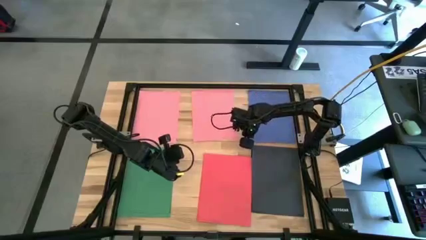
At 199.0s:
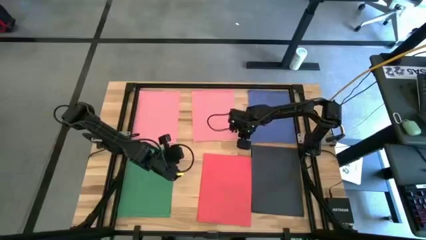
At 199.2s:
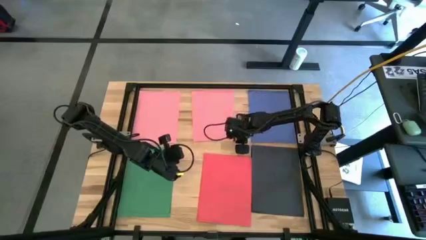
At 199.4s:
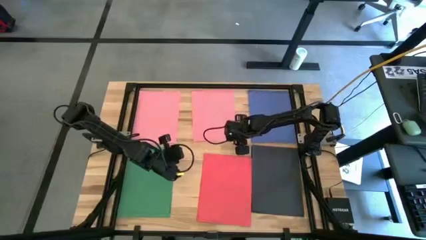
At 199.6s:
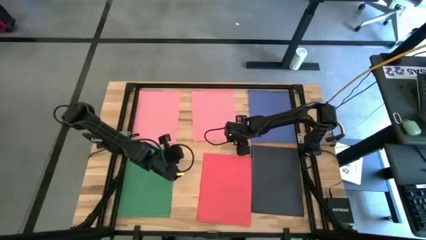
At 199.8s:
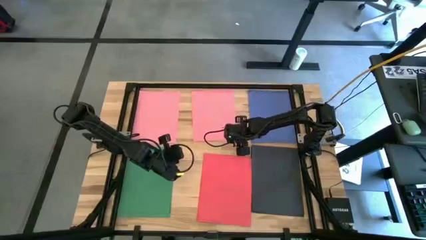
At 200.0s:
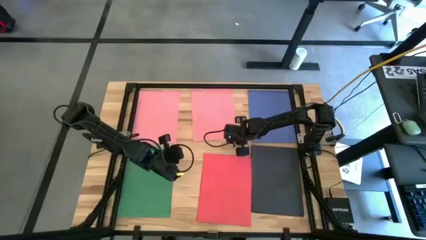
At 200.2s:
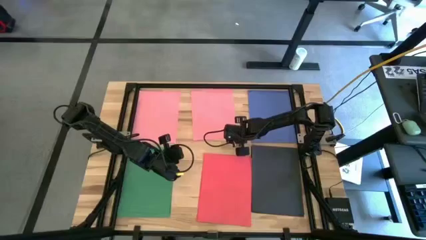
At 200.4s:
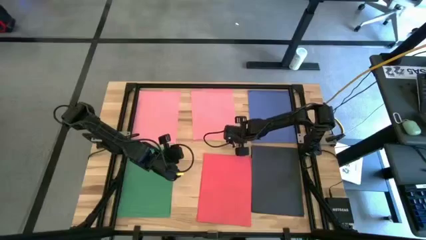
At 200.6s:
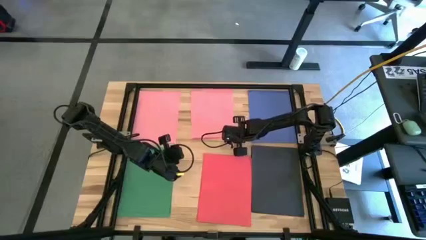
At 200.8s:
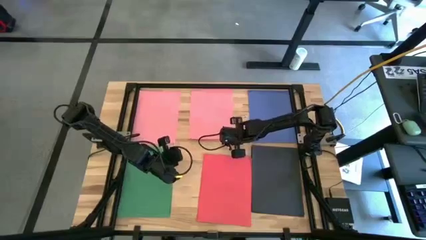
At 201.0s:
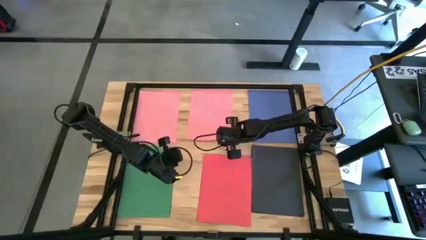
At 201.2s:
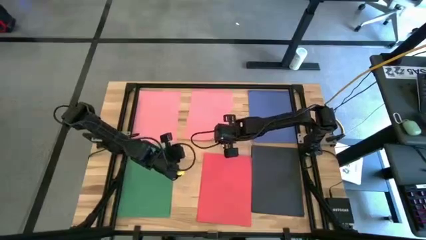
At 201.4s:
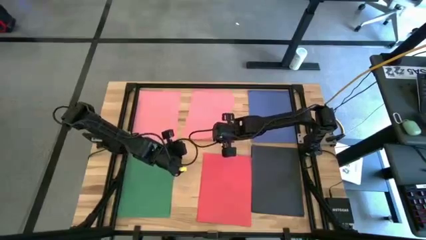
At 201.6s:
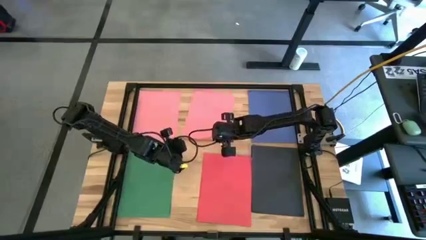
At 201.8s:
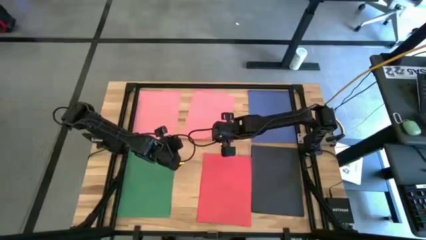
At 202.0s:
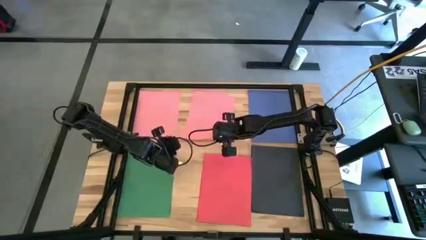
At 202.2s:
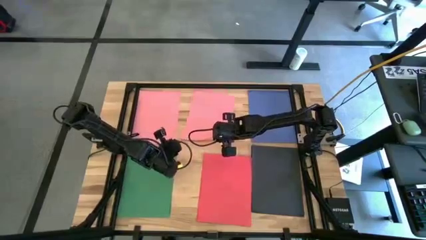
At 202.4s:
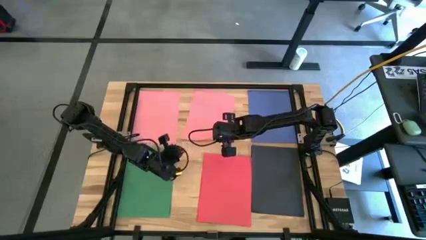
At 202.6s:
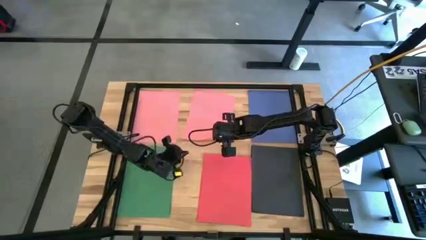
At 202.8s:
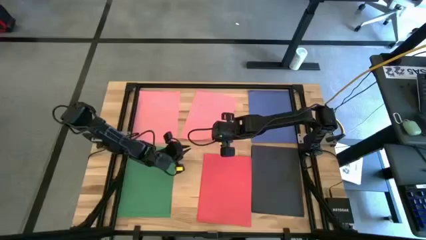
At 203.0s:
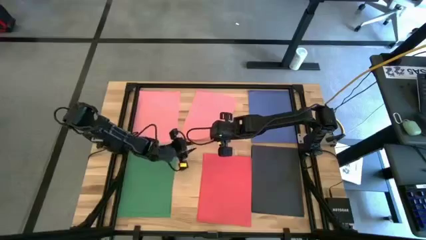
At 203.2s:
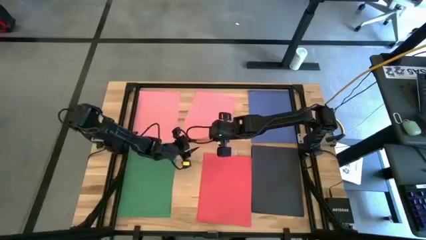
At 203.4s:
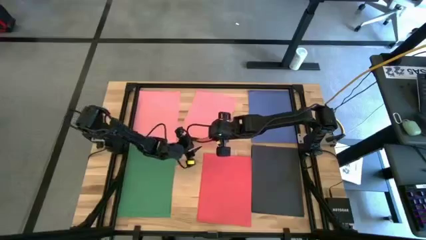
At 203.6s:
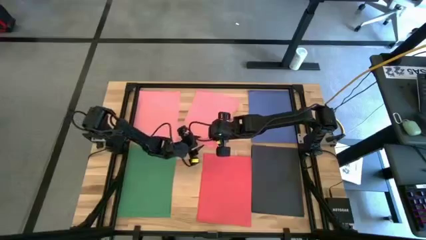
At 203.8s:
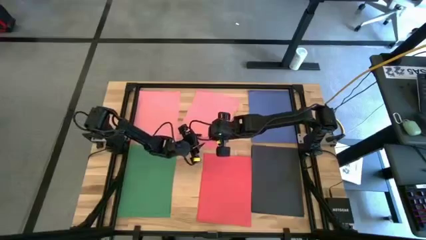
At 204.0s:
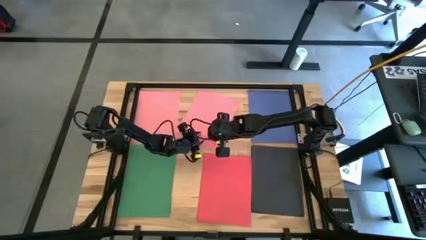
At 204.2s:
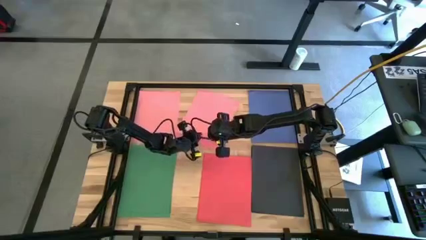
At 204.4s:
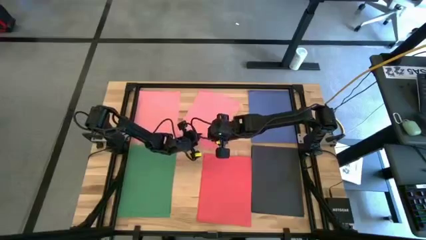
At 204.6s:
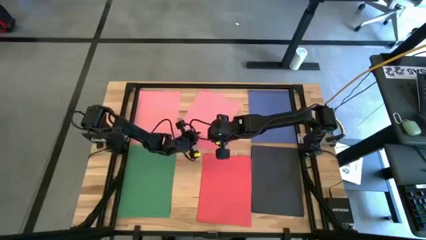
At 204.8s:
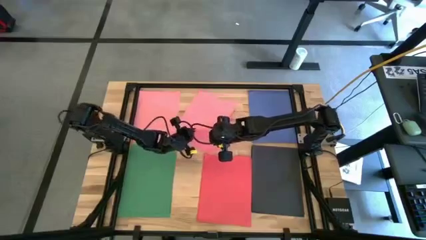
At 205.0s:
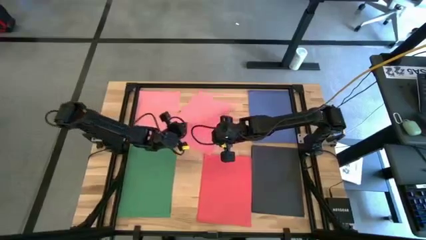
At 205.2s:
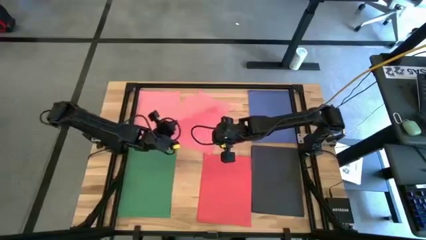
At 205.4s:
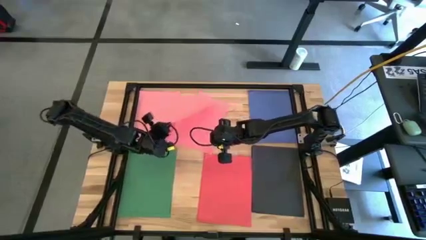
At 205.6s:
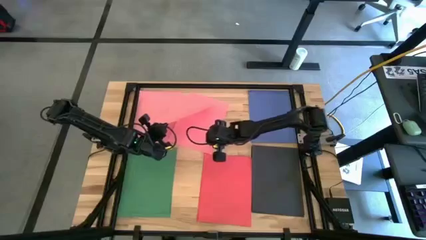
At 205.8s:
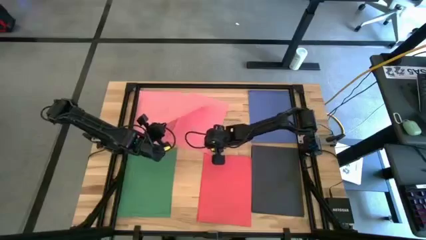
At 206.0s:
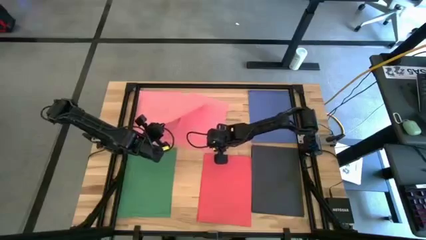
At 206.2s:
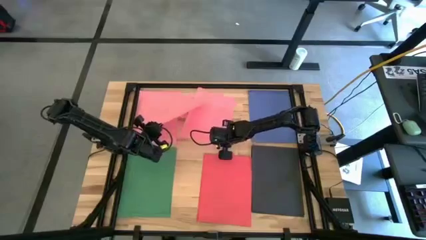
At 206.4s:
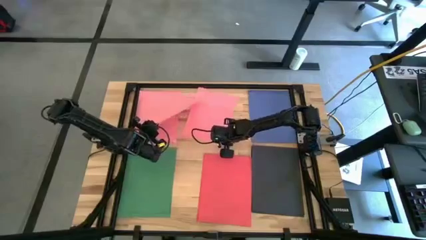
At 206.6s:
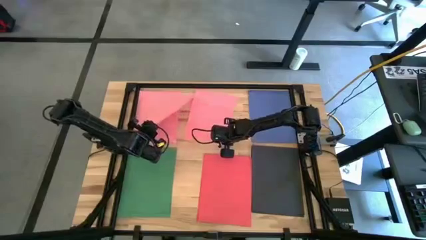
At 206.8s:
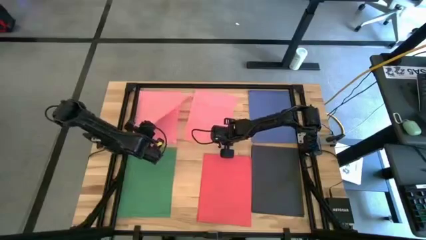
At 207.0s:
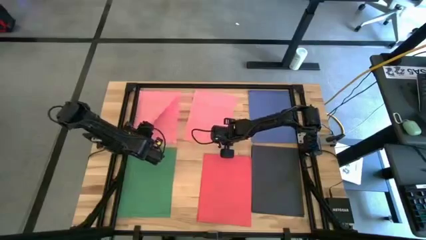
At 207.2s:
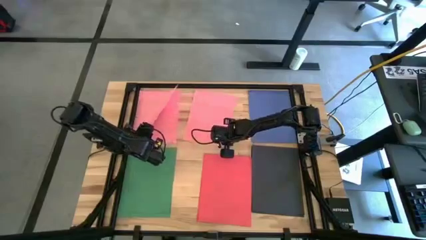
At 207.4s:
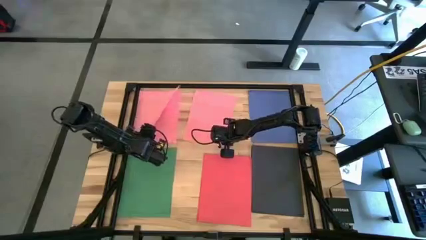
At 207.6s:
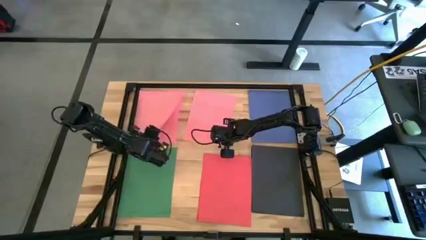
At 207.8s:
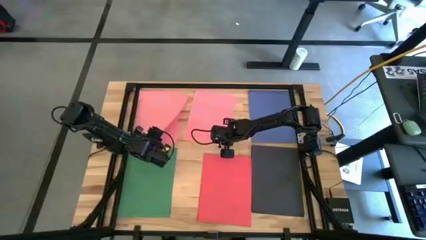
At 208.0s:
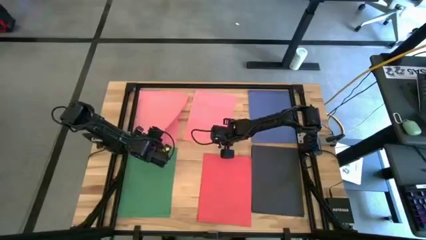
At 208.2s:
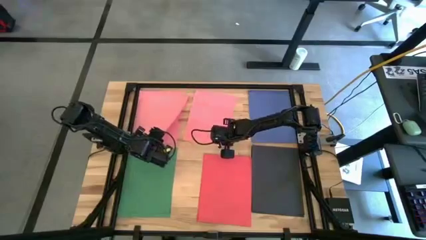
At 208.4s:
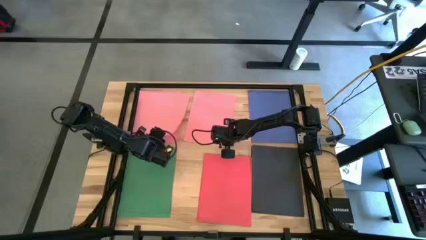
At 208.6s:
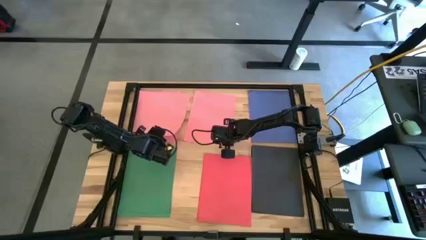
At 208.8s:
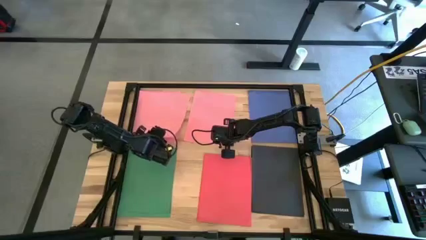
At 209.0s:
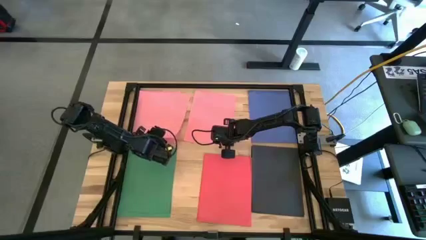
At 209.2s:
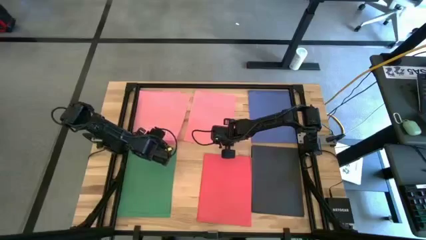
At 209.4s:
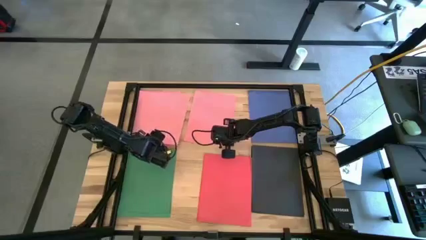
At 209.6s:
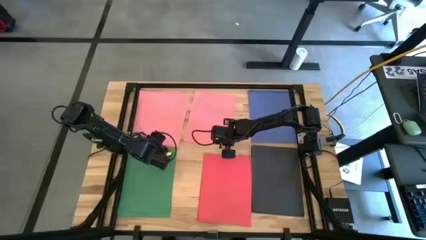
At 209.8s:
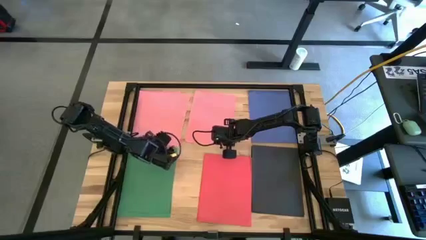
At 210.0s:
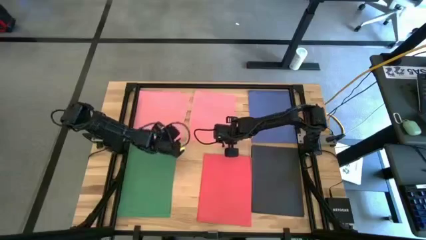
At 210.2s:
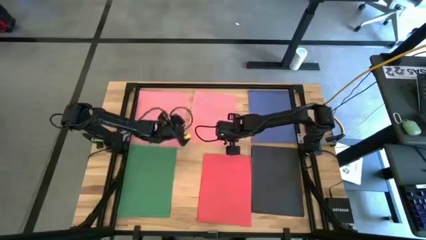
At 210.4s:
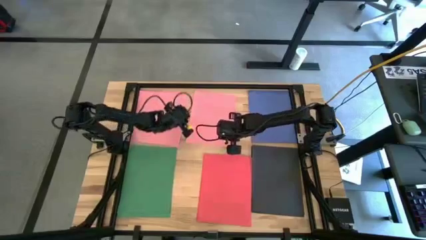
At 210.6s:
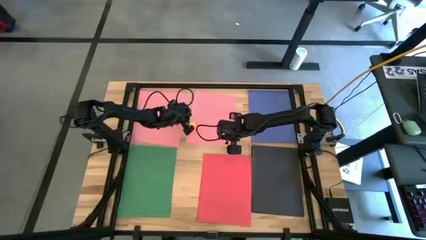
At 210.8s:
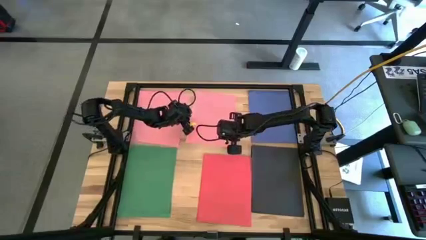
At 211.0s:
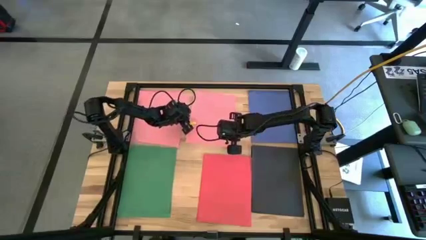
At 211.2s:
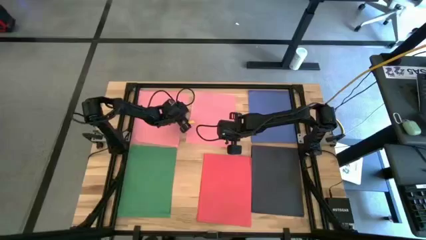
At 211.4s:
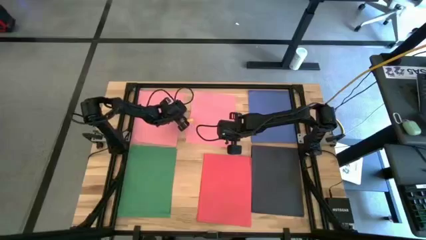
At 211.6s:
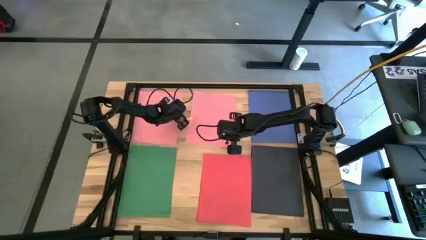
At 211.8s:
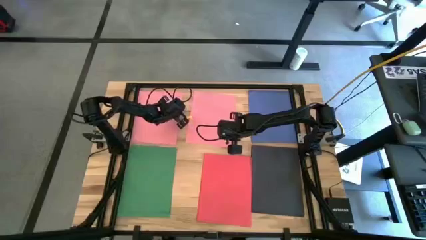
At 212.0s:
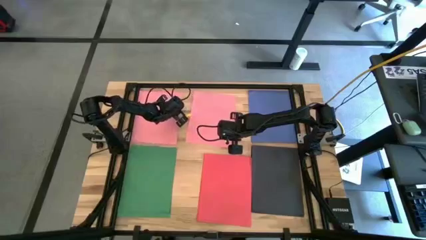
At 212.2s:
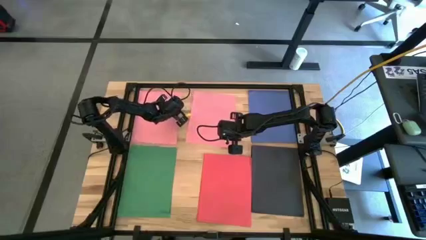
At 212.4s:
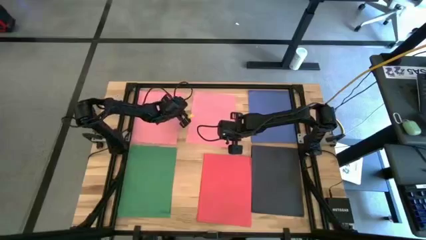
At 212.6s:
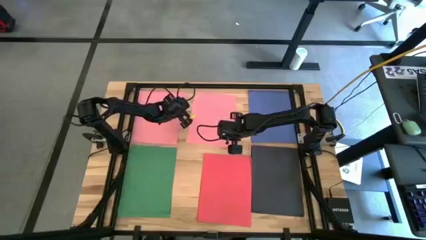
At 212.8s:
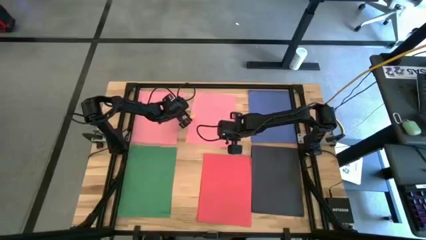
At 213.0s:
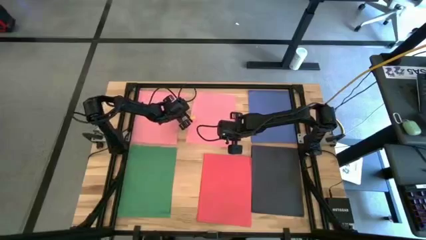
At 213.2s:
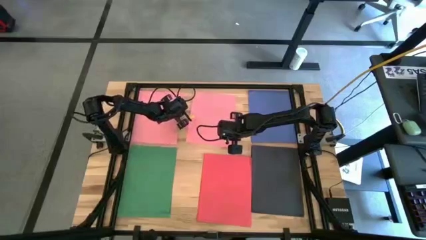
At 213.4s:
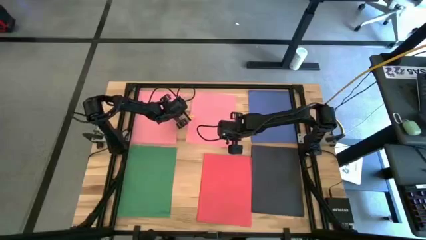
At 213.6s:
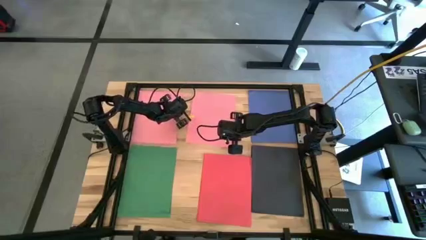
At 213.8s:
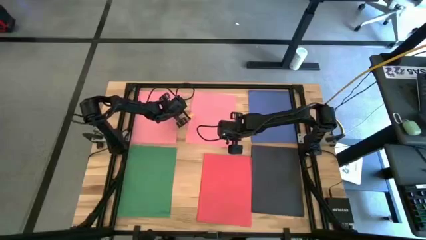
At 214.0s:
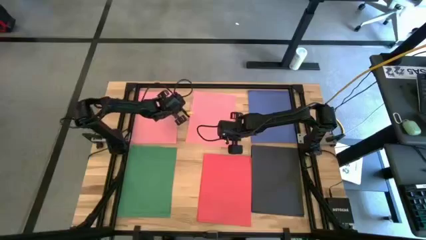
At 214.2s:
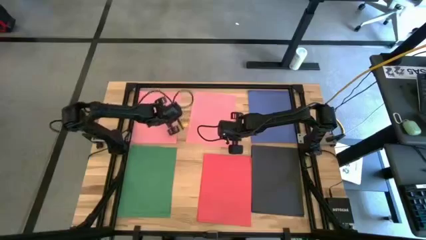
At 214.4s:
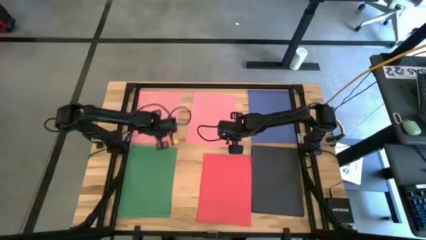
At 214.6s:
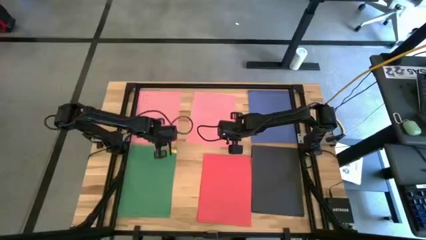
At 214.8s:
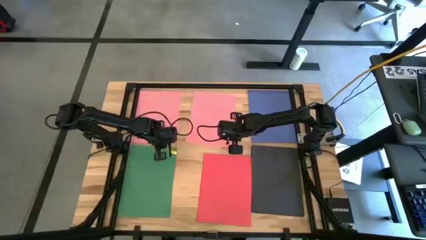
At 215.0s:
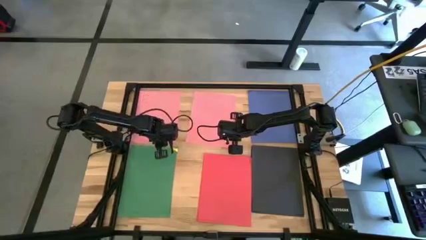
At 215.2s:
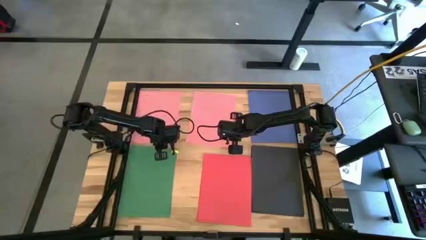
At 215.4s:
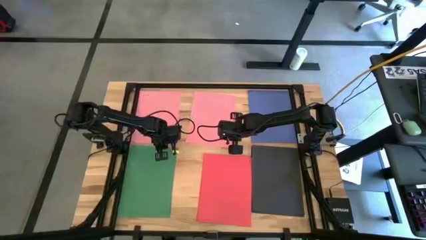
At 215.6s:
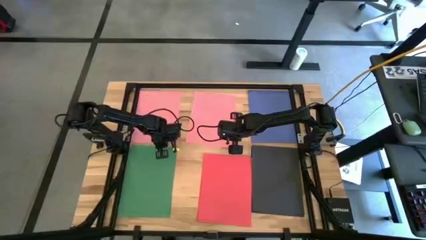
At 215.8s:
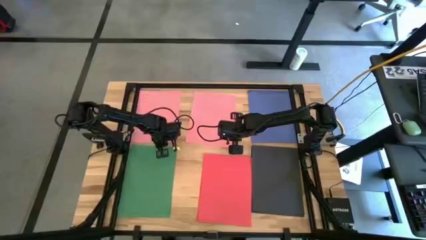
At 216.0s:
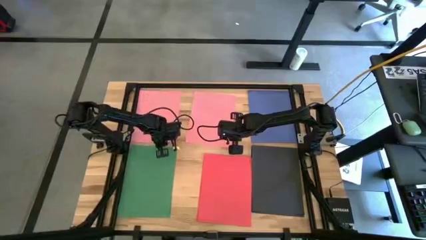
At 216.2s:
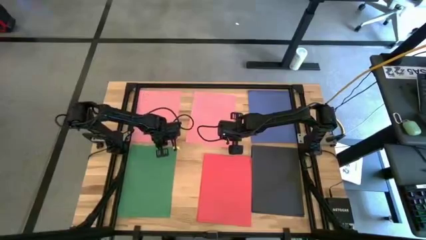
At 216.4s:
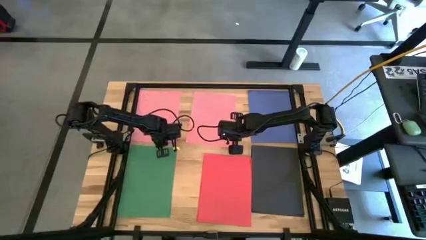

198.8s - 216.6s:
Task: Organize paper
Stack the pink paper on top of the pink paper
